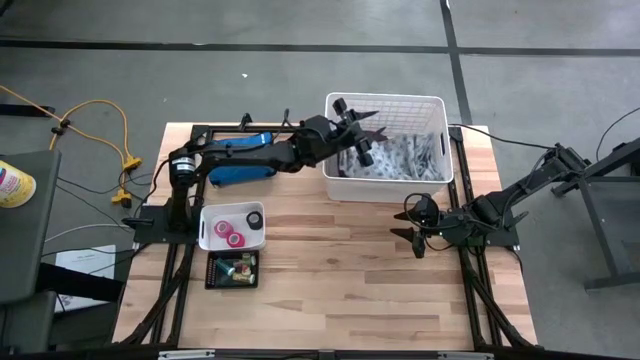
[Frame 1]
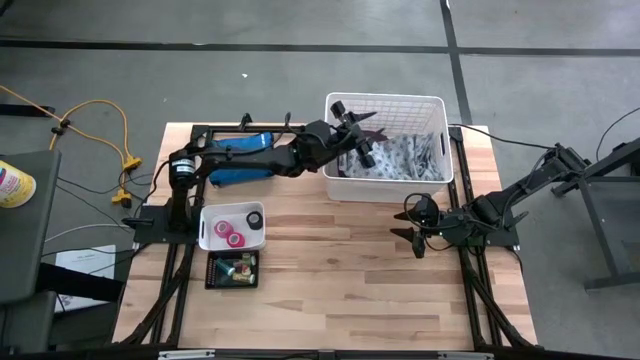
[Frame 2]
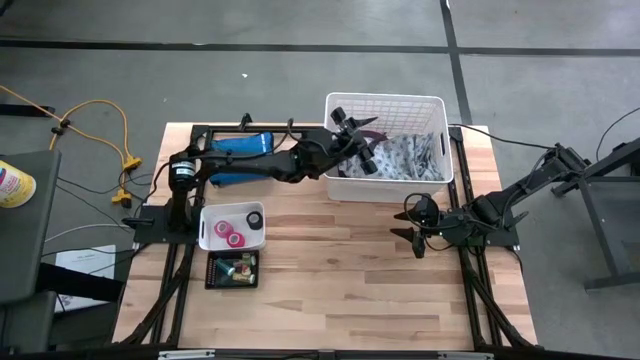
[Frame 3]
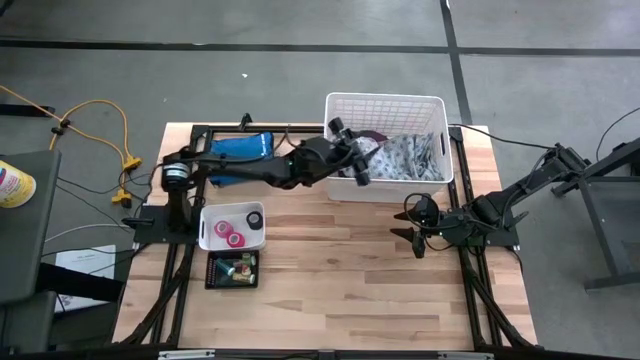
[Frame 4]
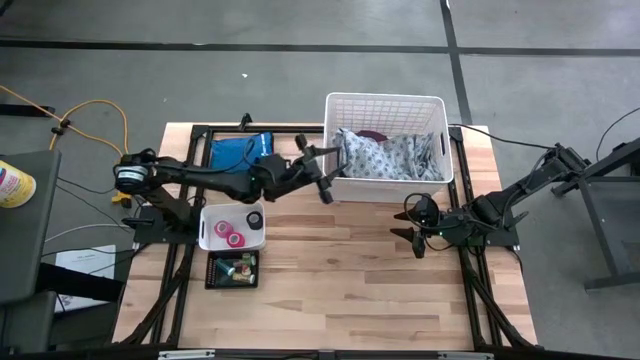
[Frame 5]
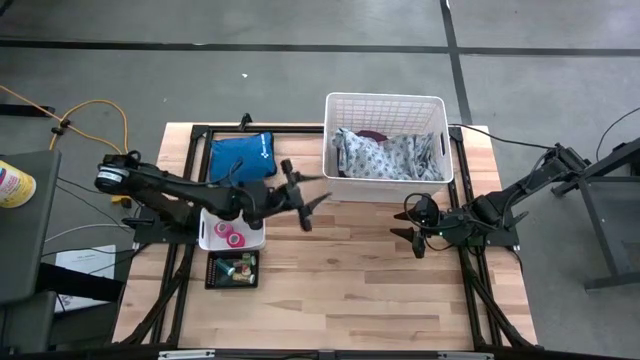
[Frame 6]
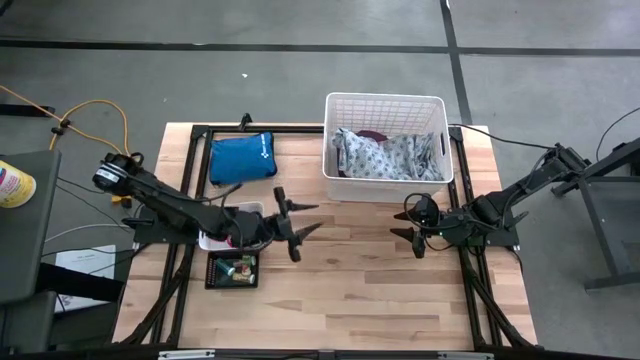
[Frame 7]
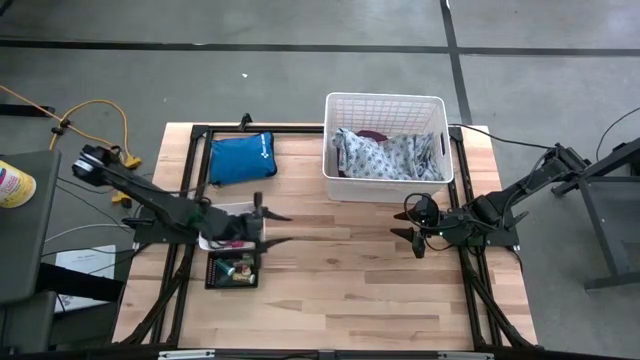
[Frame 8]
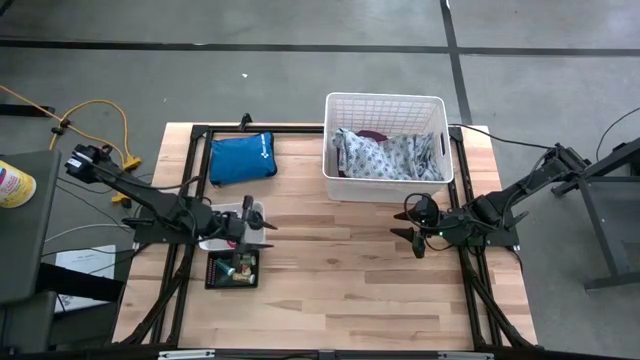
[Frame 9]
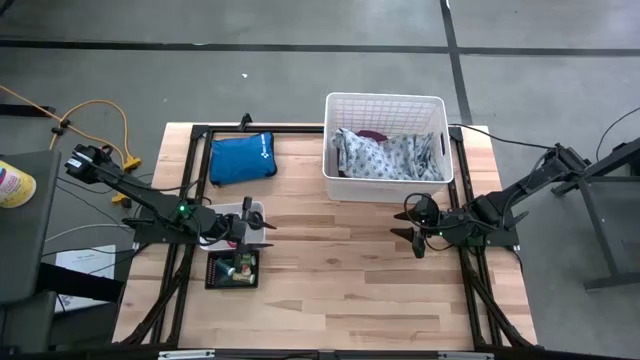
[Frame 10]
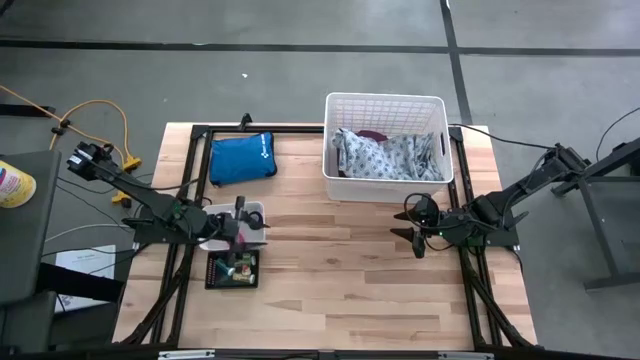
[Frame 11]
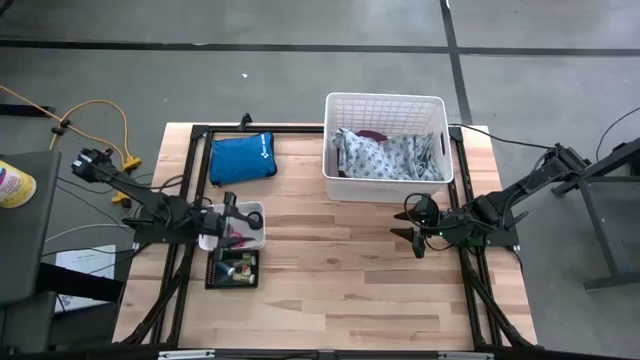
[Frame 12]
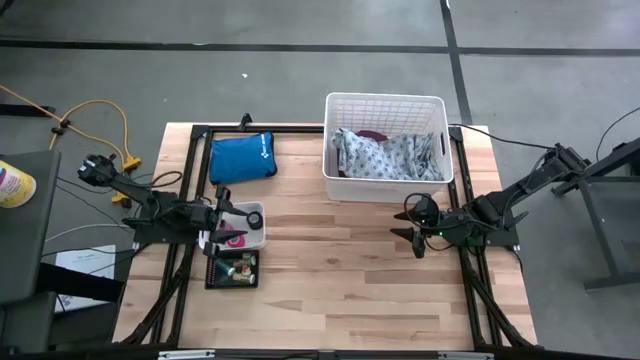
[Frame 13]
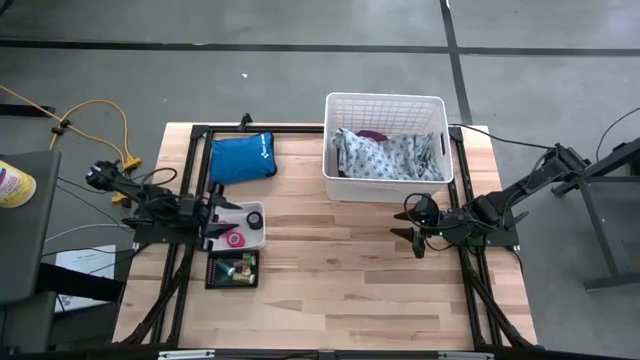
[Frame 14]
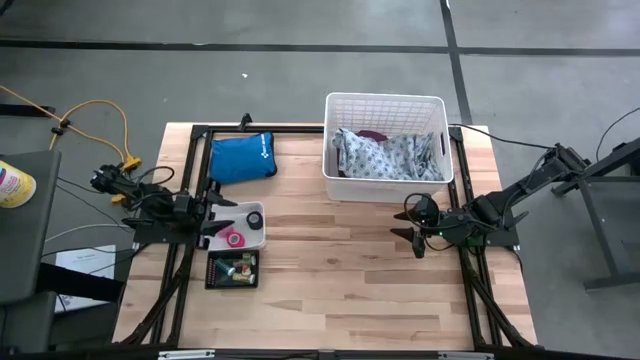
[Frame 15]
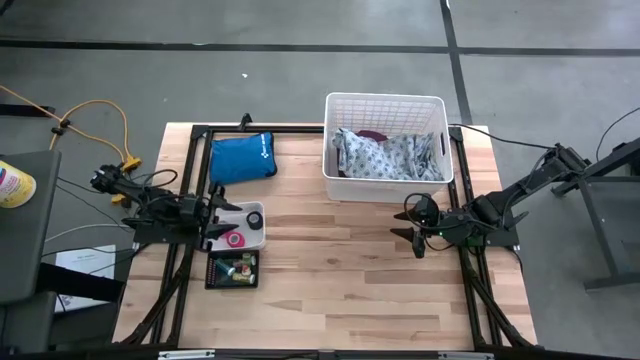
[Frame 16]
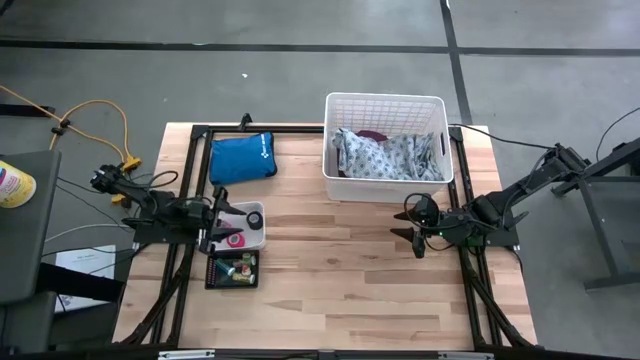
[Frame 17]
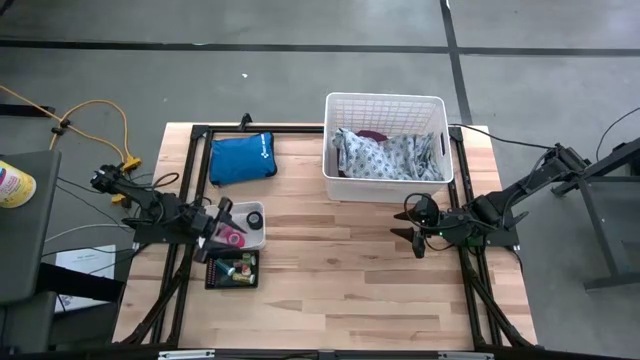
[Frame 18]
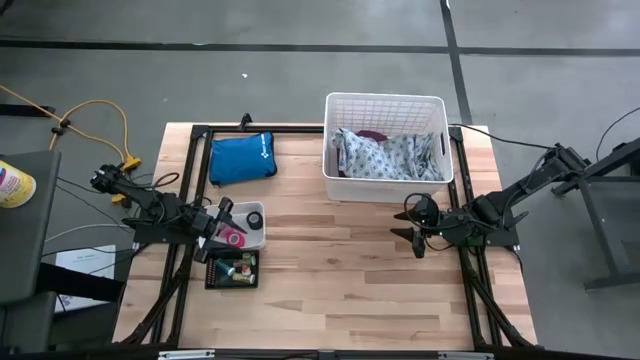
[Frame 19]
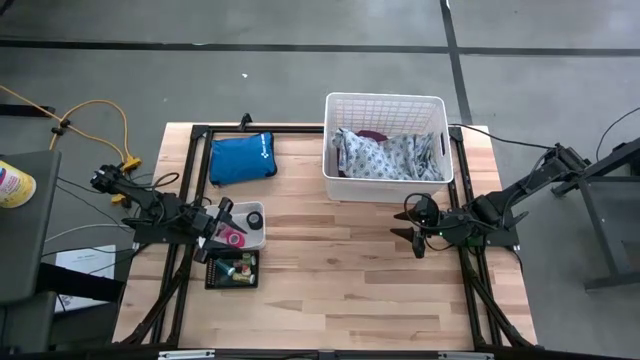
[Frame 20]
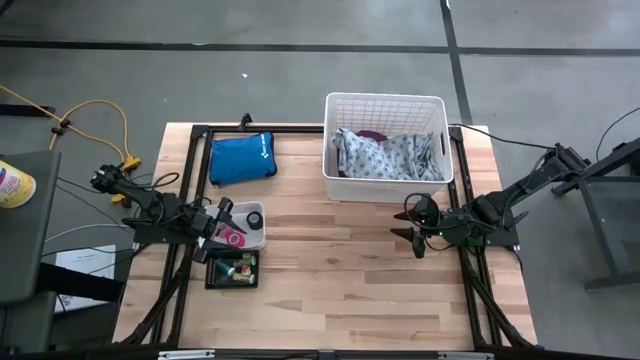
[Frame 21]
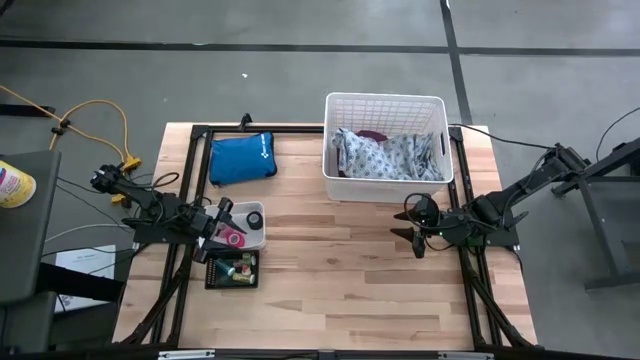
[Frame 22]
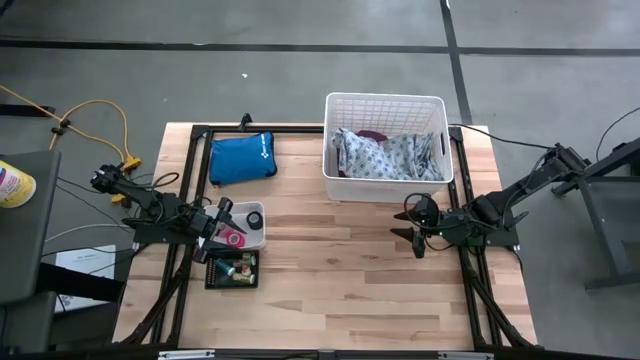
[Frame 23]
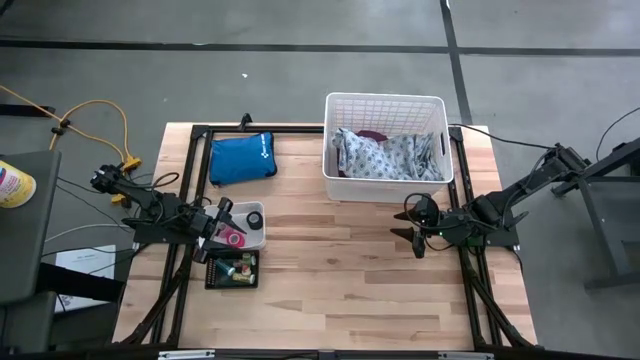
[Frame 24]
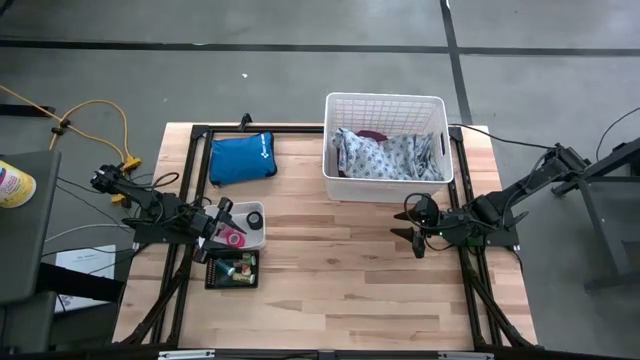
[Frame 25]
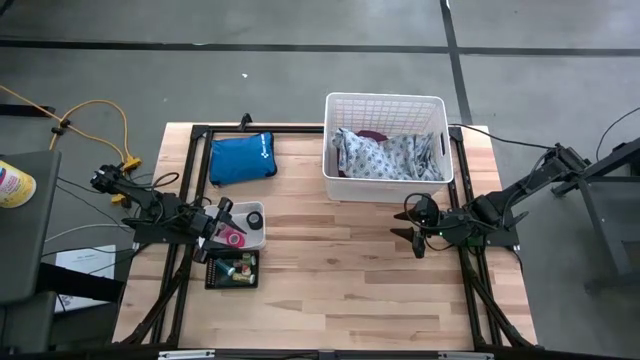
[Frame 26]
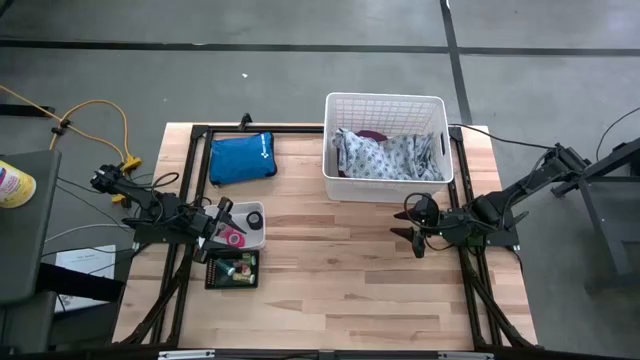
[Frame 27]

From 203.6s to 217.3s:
Task: Pick & place medical supplies in basket/bin
Return to Home Position

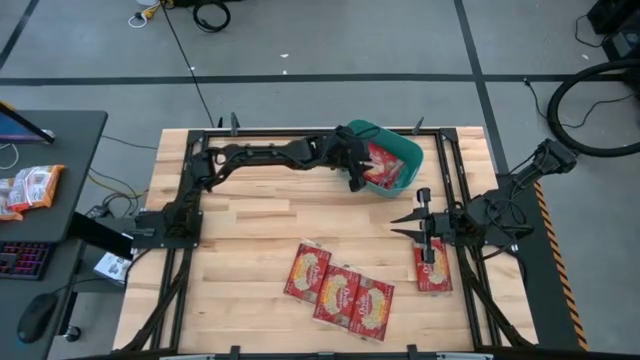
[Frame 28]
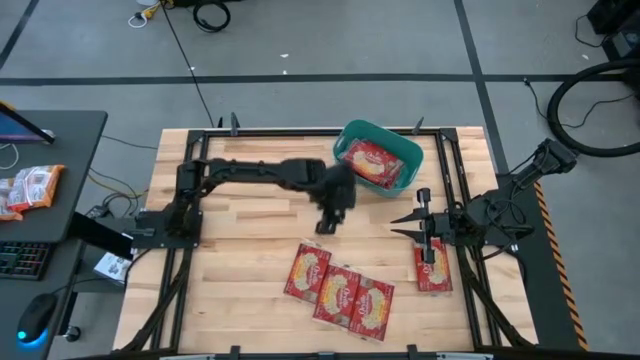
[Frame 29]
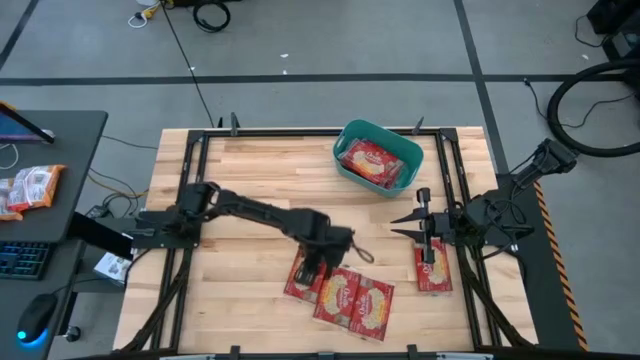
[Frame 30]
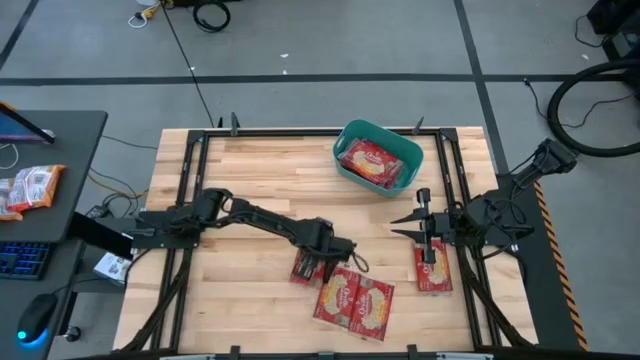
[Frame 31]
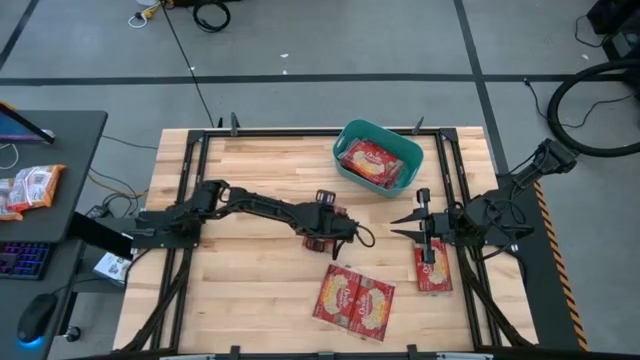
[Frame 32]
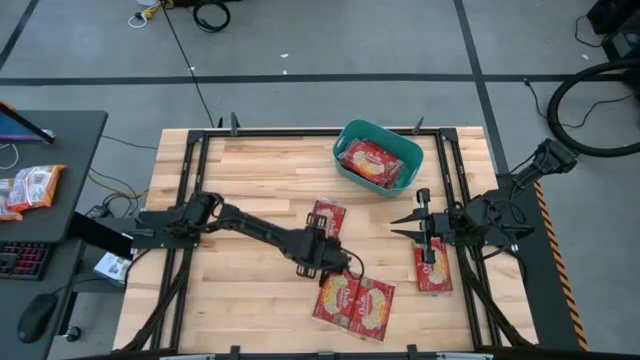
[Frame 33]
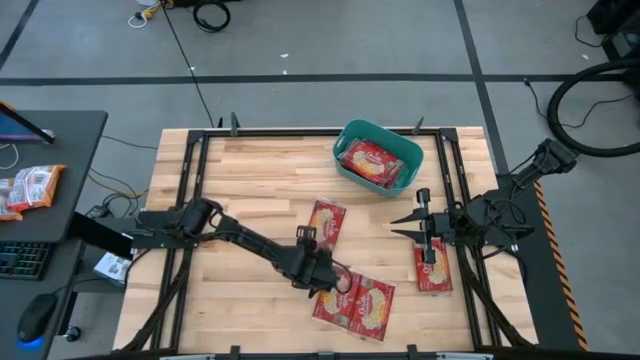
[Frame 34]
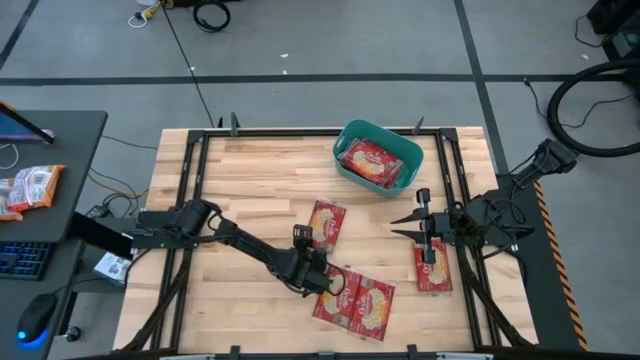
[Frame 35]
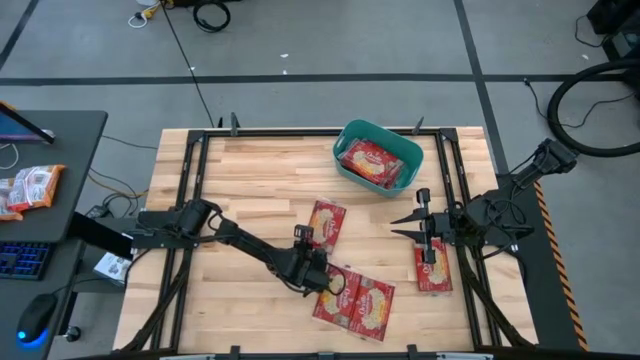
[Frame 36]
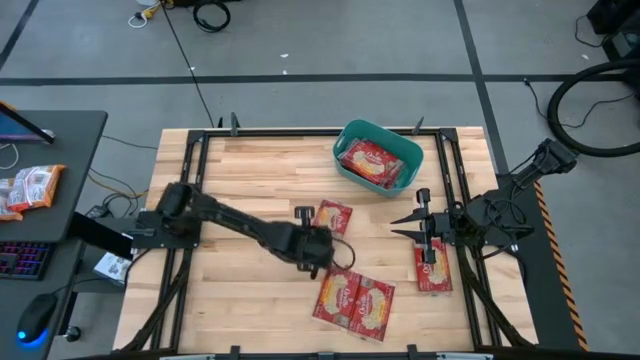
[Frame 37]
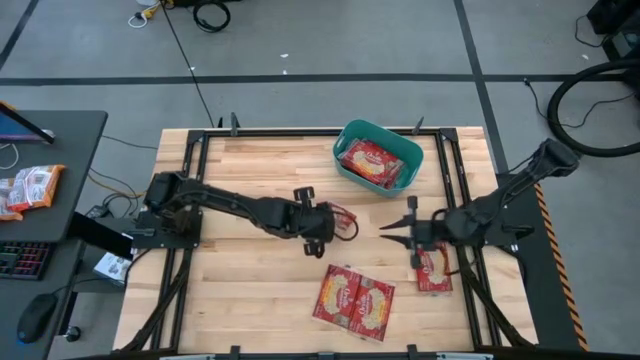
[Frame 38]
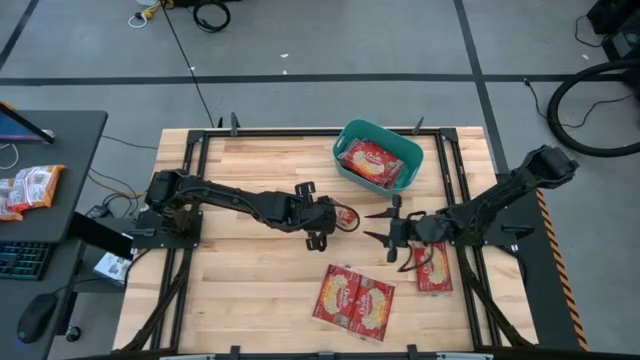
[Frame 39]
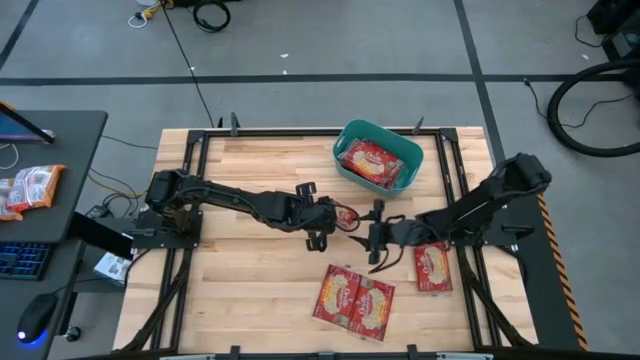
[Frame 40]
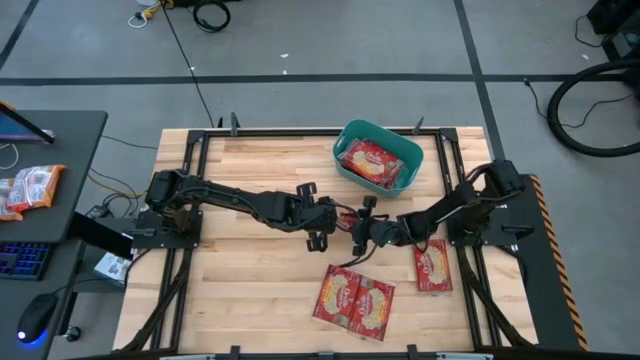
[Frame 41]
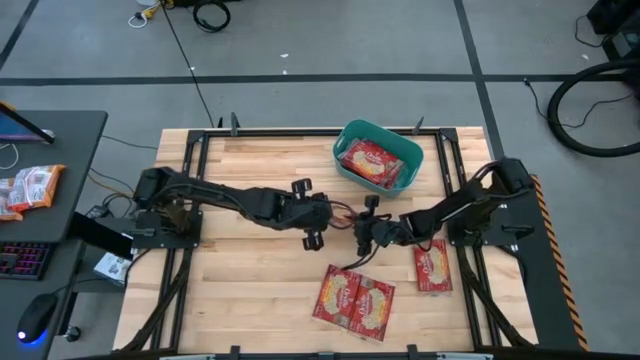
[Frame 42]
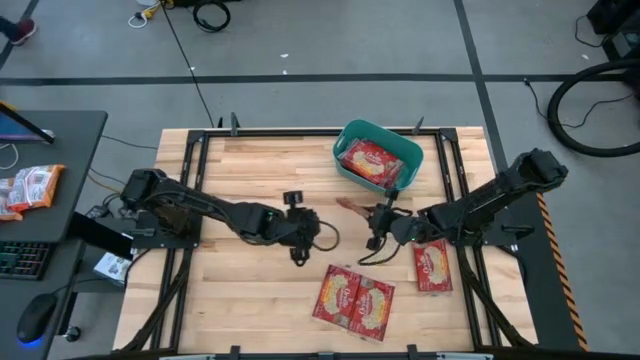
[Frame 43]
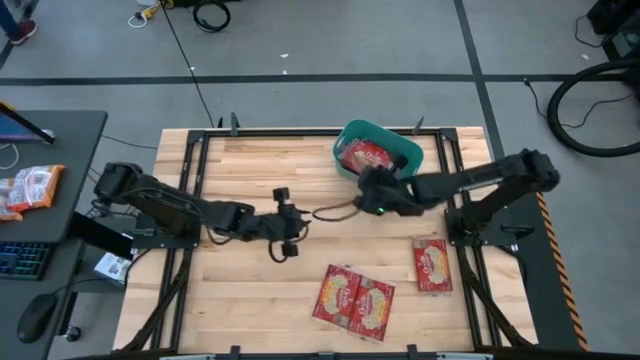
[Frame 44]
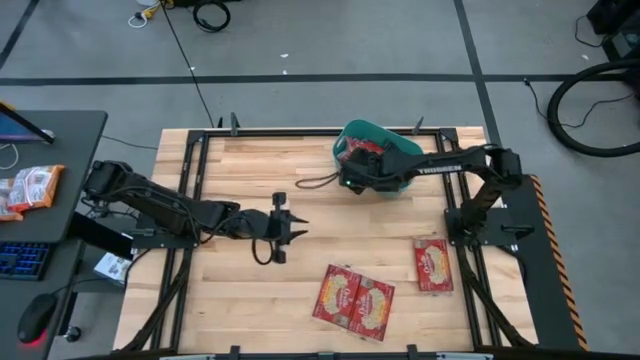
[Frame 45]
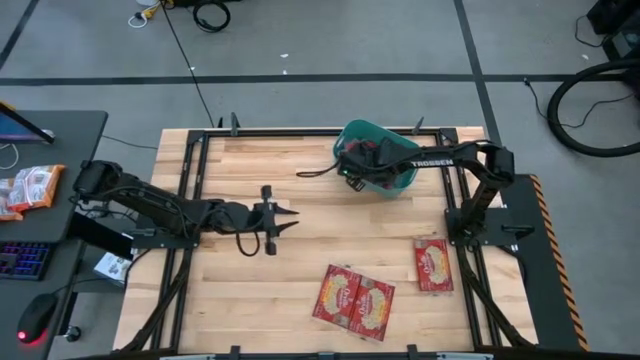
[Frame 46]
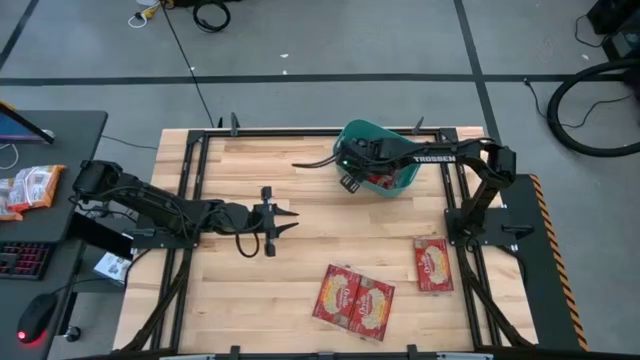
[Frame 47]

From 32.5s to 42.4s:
Task: Sort popcorn bags into baskets
Put the popcorn bag into the bin
